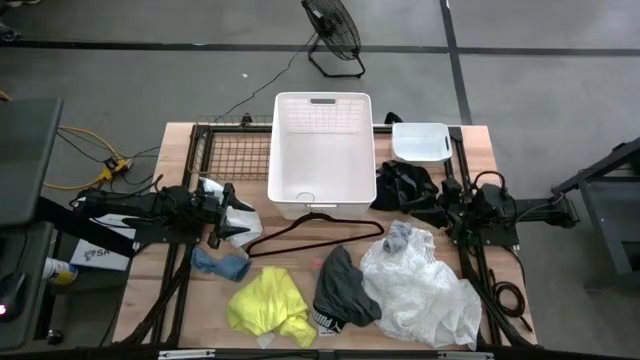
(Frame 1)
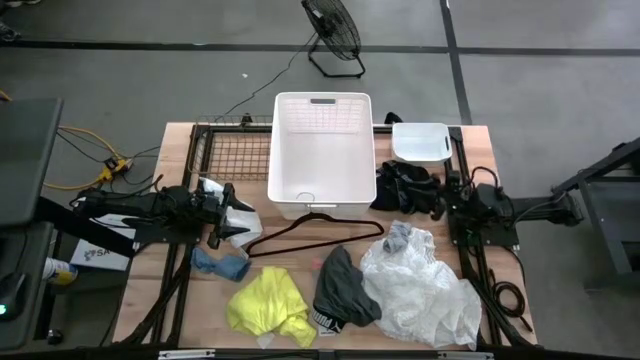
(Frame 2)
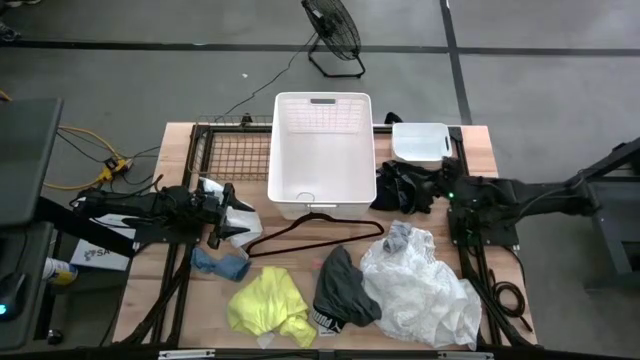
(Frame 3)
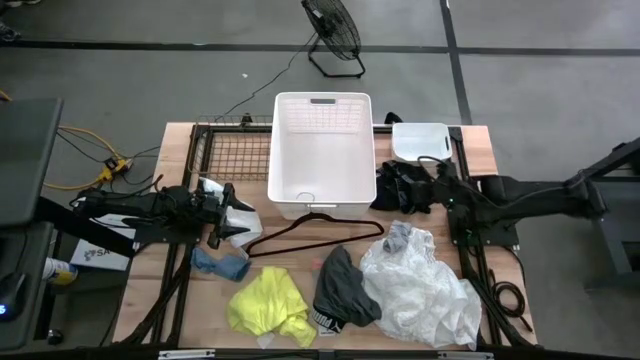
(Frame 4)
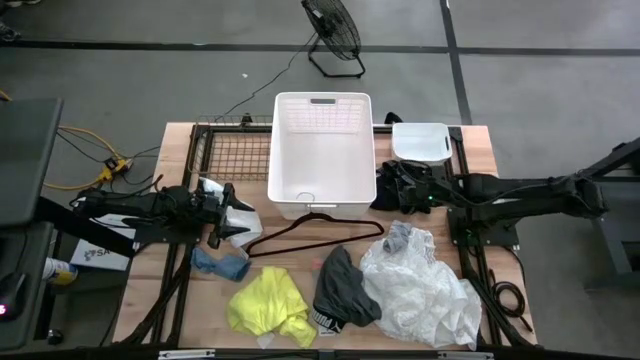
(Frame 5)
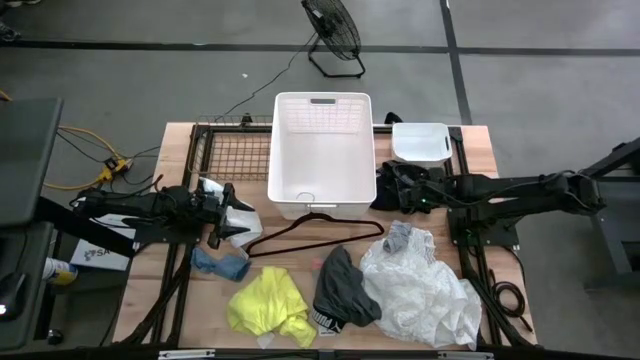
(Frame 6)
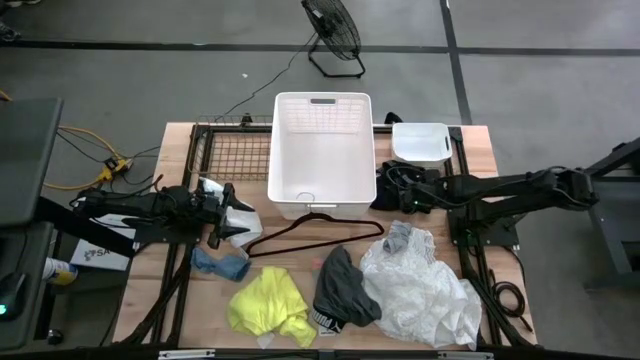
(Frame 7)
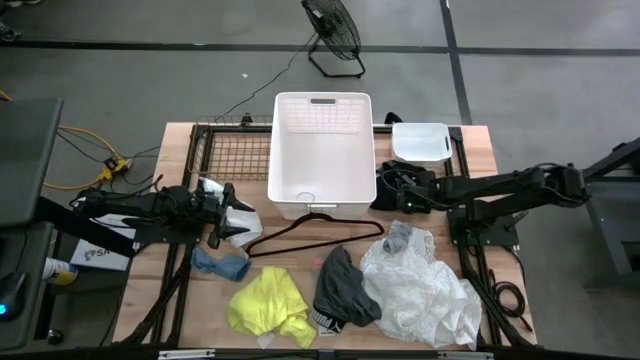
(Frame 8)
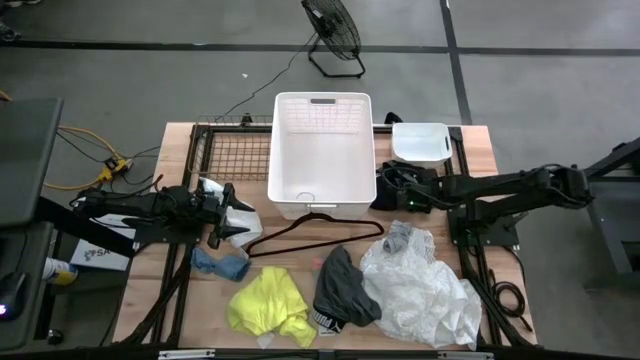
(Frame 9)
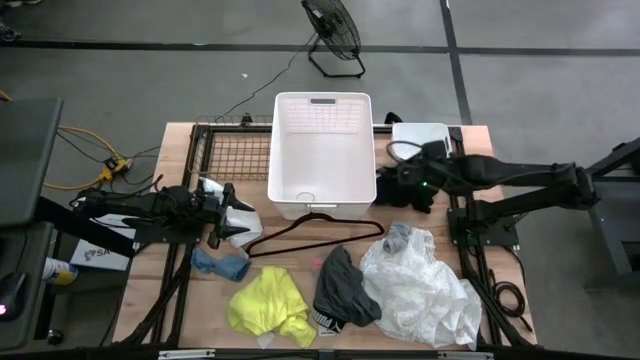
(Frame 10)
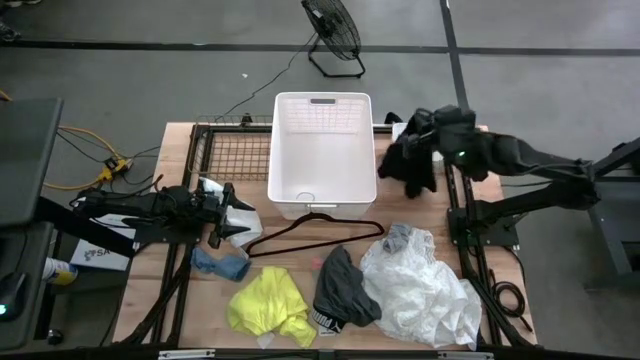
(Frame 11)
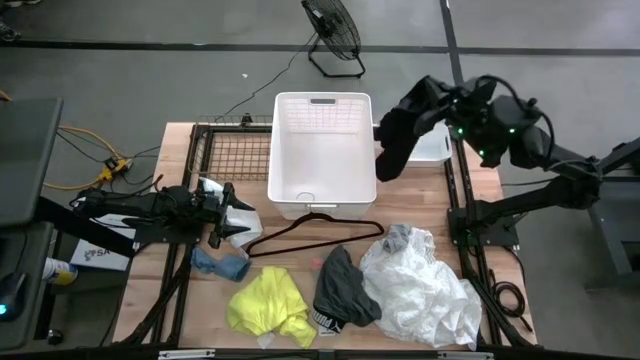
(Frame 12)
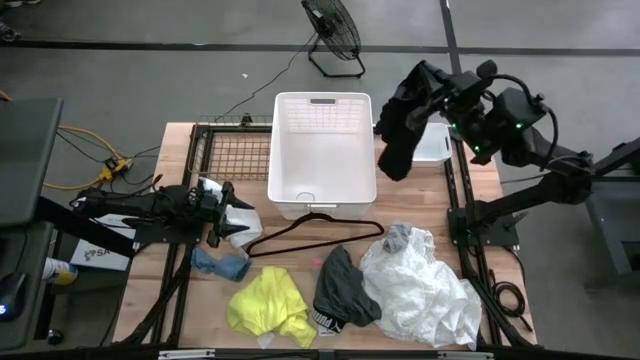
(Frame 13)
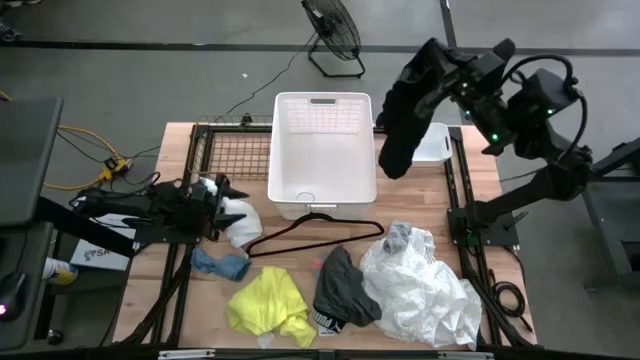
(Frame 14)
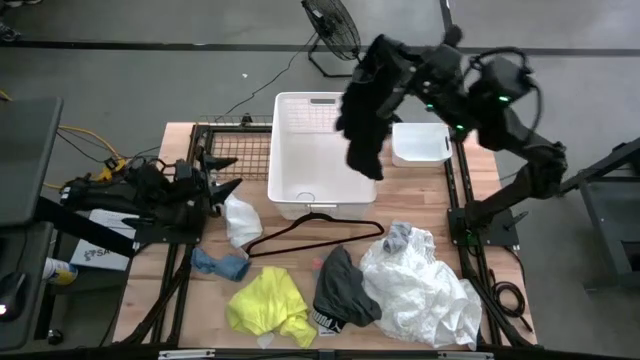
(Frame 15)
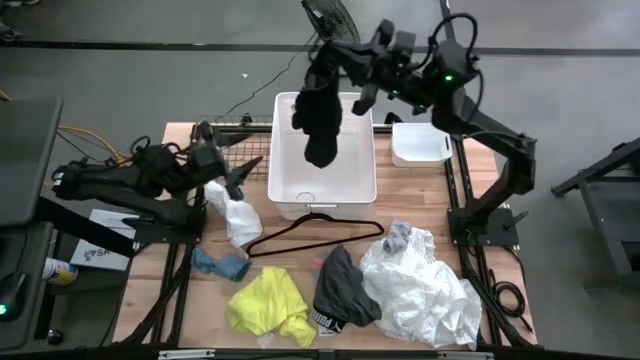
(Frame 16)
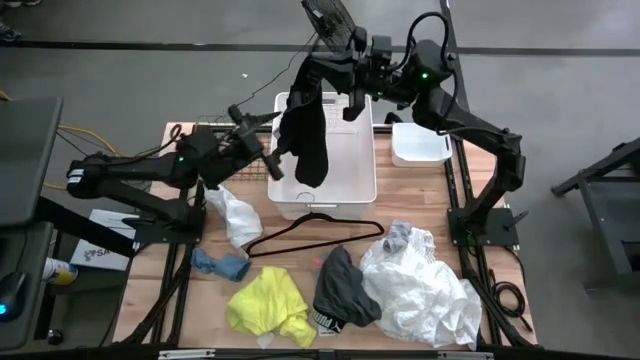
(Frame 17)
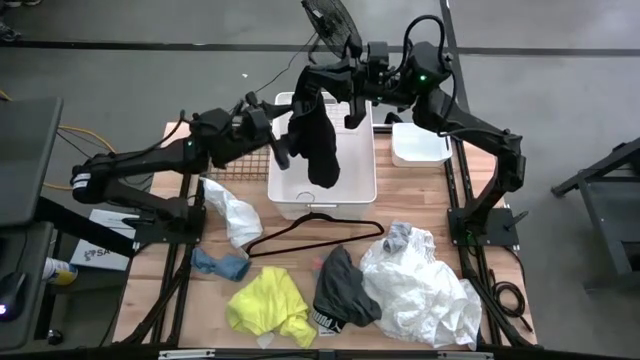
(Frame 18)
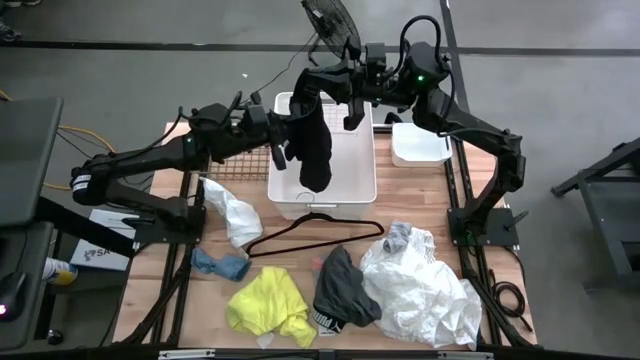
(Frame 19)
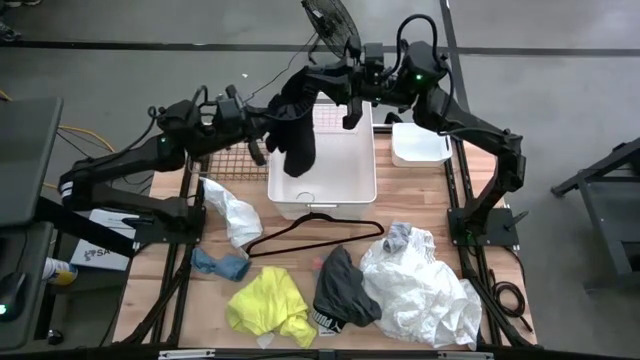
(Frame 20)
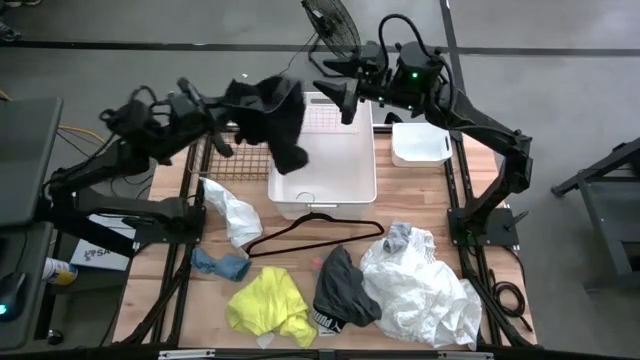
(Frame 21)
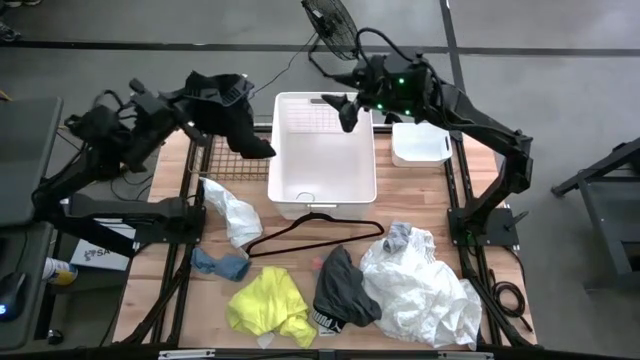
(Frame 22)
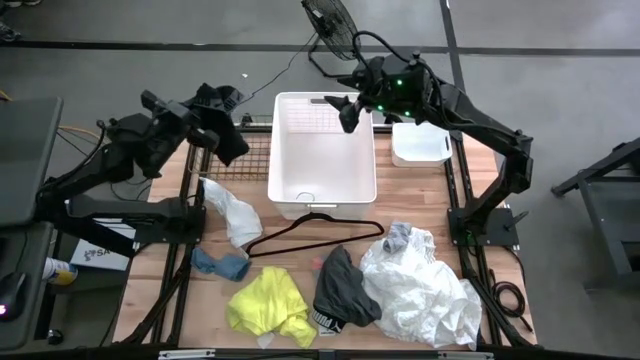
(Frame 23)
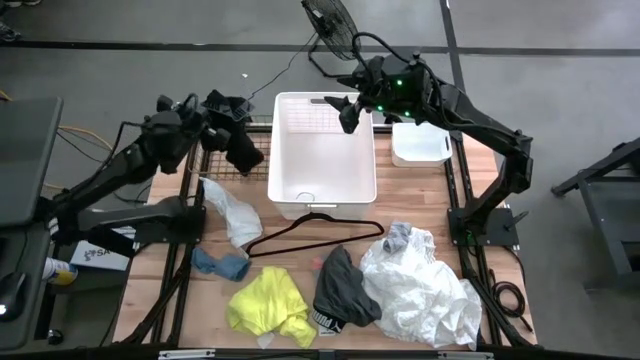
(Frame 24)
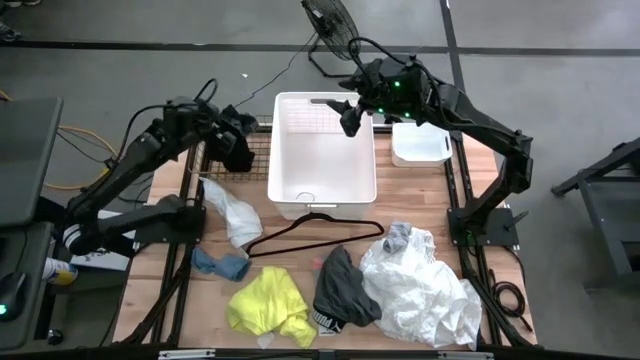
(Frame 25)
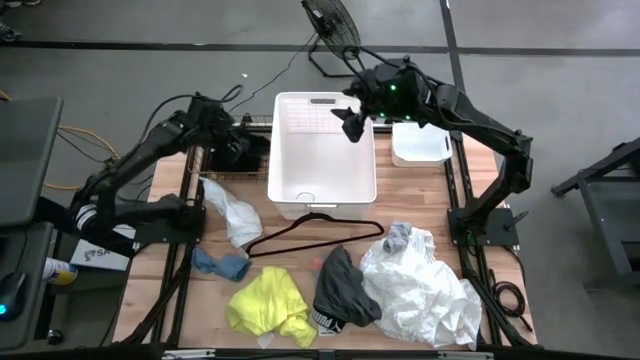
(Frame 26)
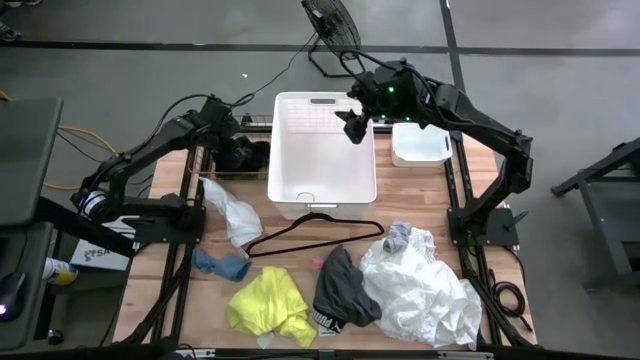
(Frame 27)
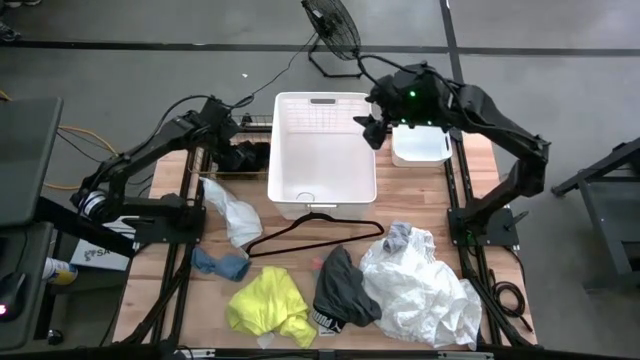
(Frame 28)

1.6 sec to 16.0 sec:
Task: Pick & Place Cloths
Put the black underwear into the wire basket

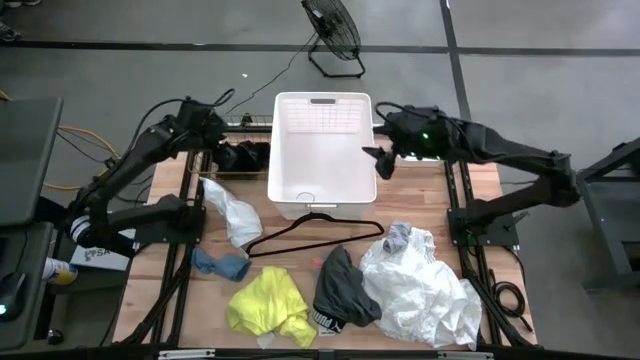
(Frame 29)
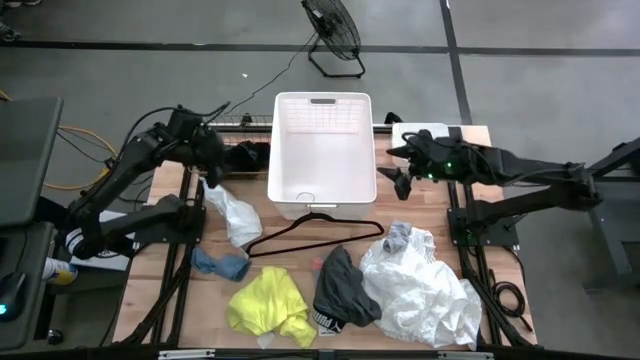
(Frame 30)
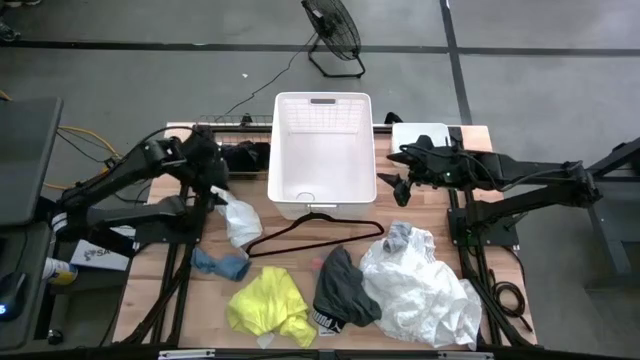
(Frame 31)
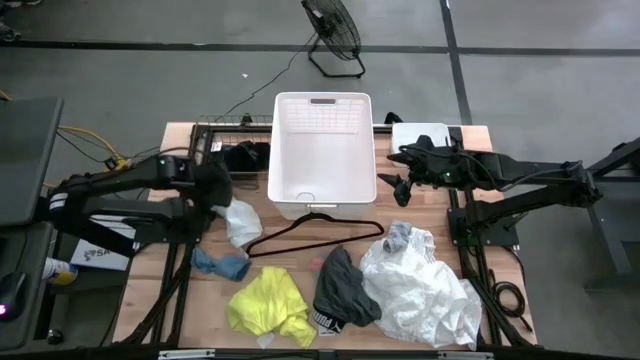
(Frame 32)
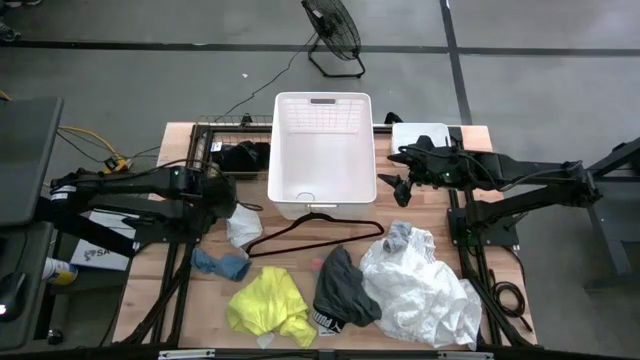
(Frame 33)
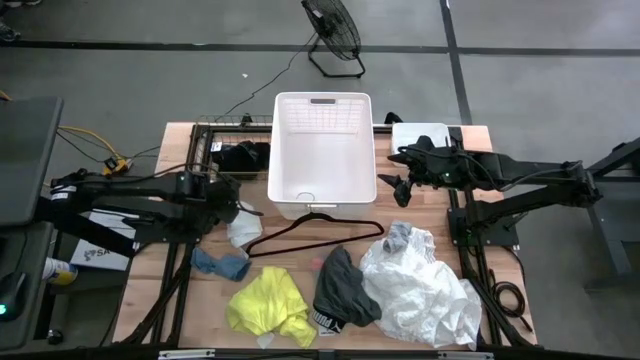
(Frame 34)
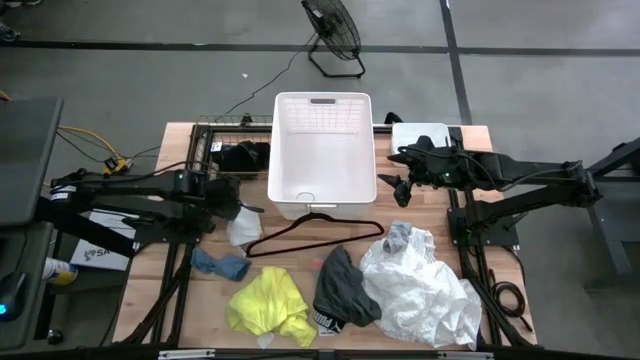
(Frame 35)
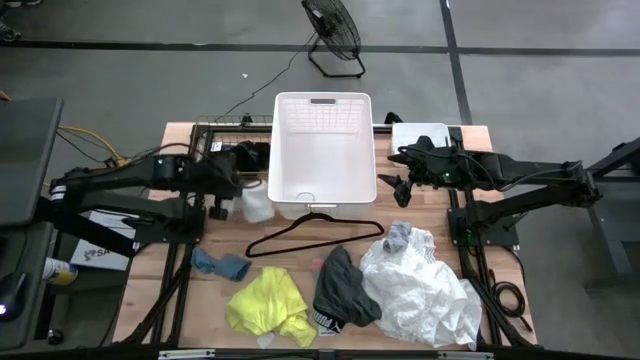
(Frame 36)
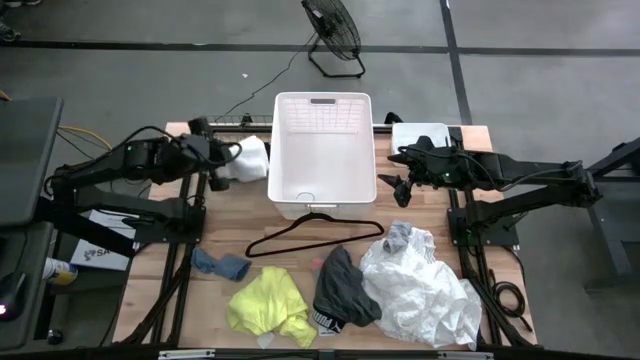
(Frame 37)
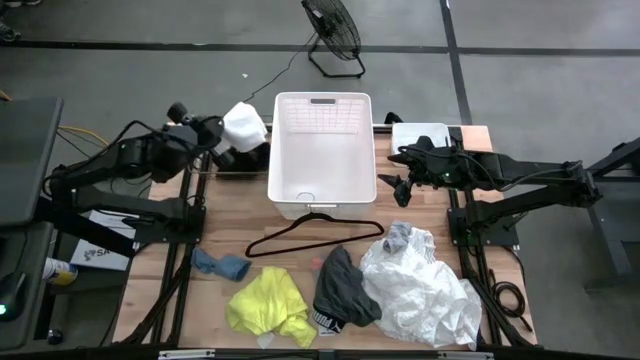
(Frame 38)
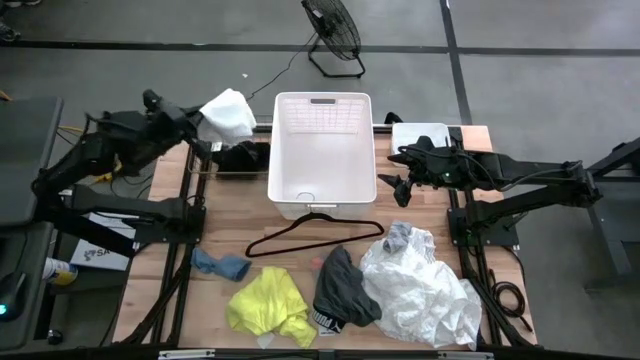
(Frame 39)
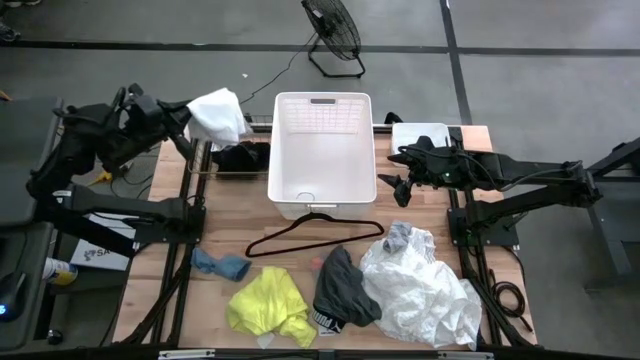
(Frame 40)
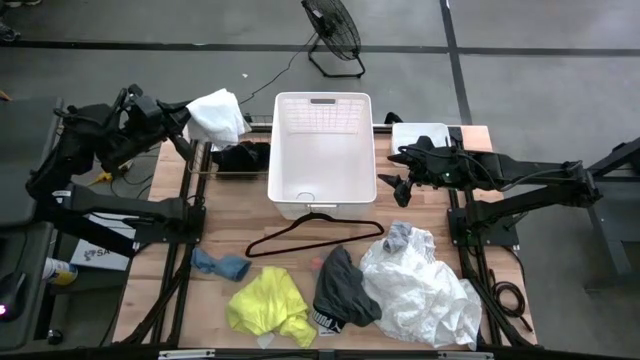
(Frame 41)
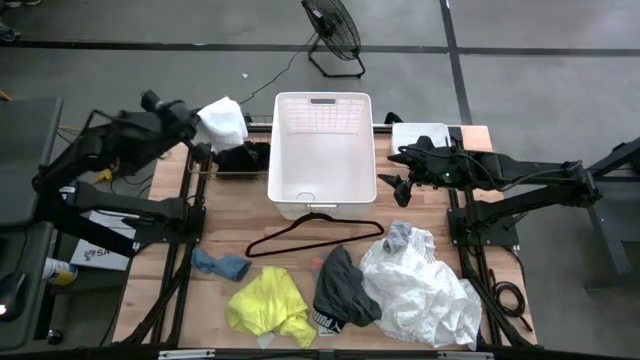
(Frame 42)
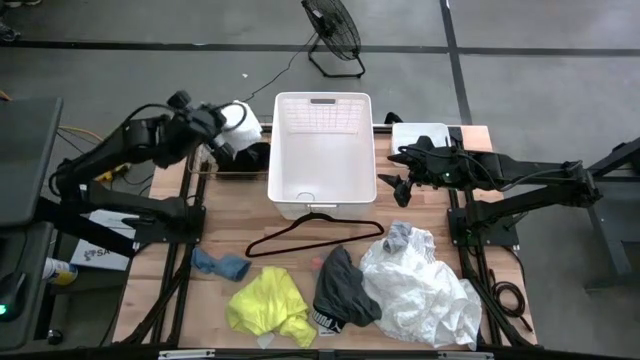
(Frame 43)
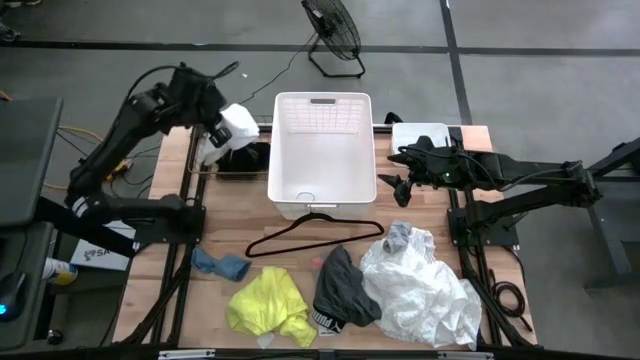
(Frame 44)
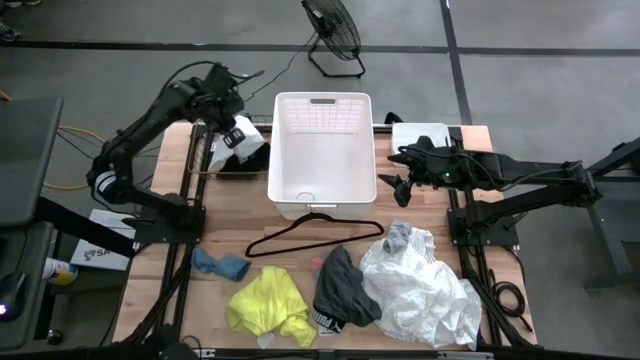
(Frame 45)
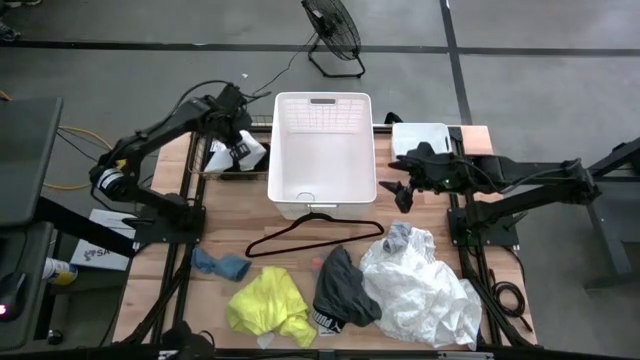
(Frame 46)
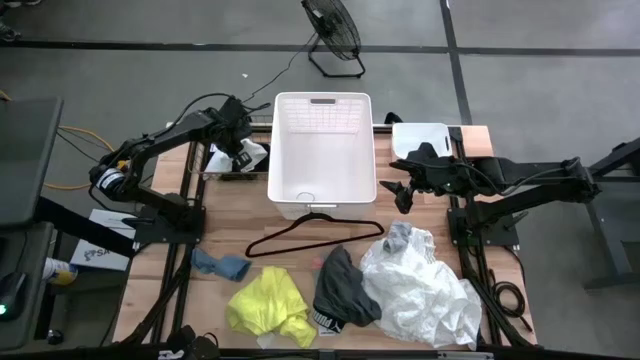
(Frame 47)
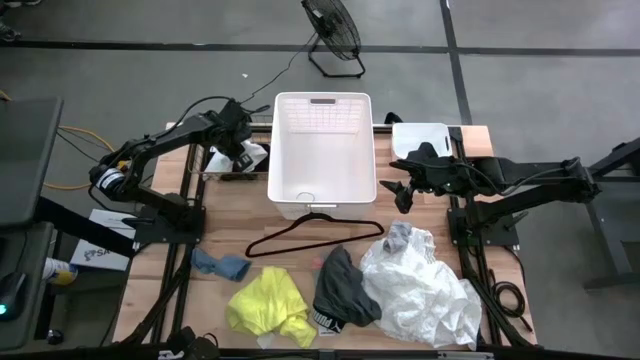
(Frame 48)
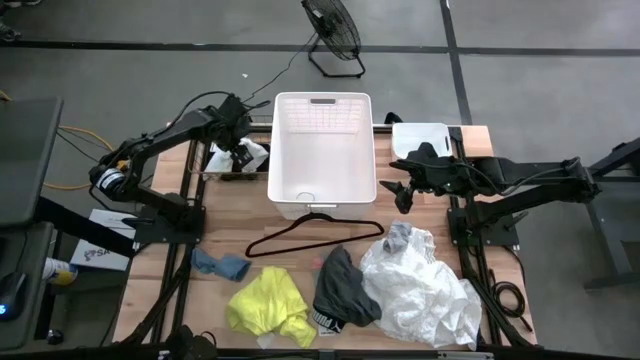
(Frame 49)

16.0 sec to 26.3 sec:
Put the white underwear into the wire basket
